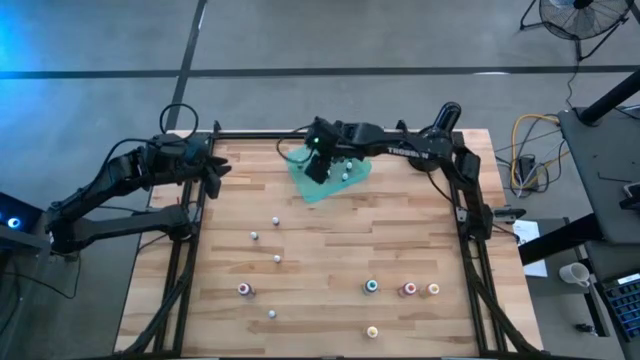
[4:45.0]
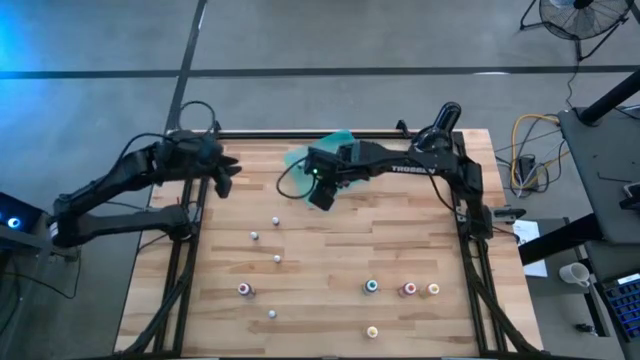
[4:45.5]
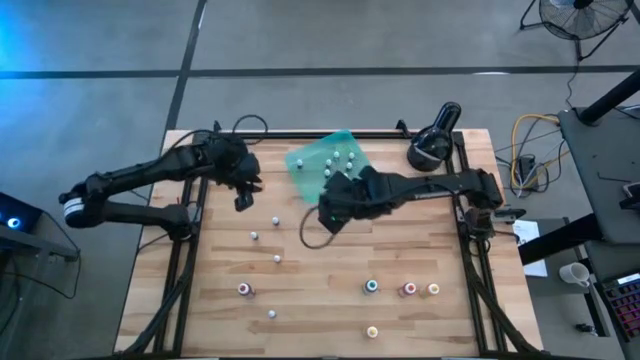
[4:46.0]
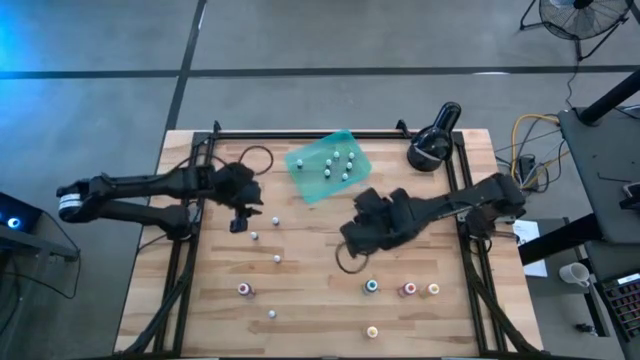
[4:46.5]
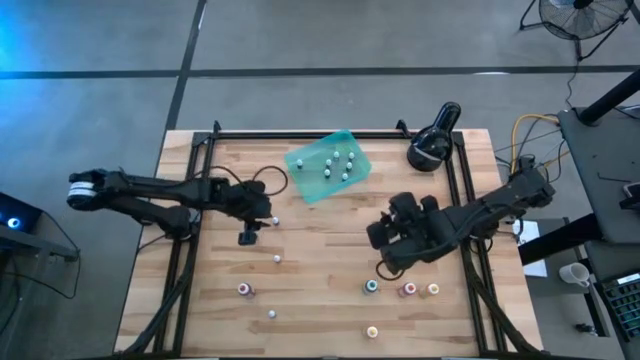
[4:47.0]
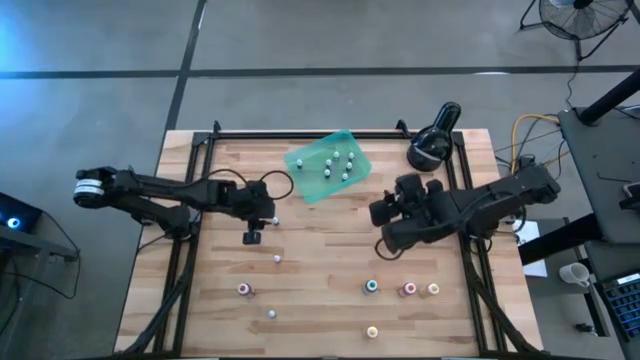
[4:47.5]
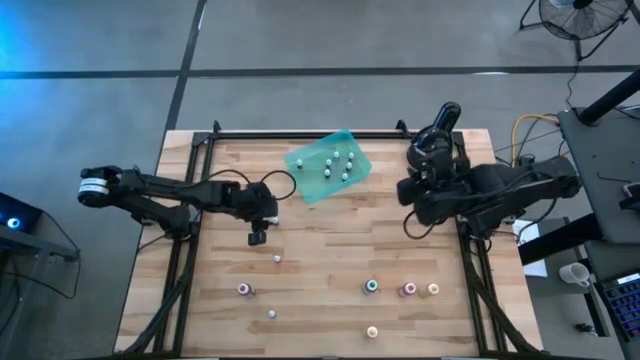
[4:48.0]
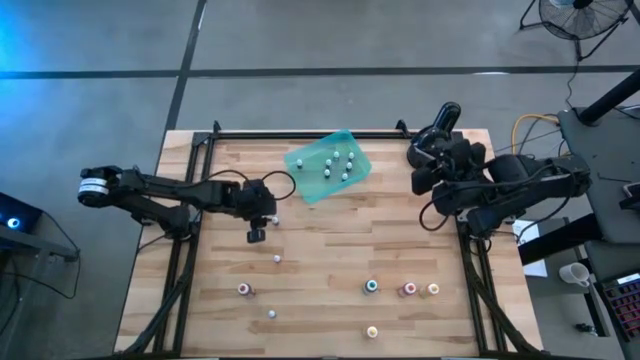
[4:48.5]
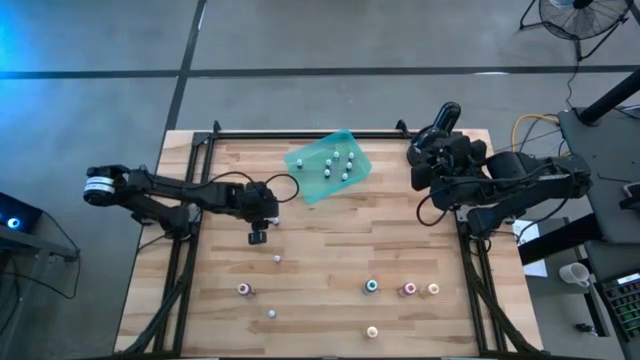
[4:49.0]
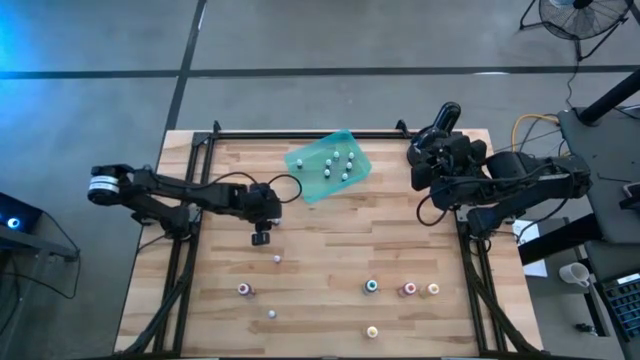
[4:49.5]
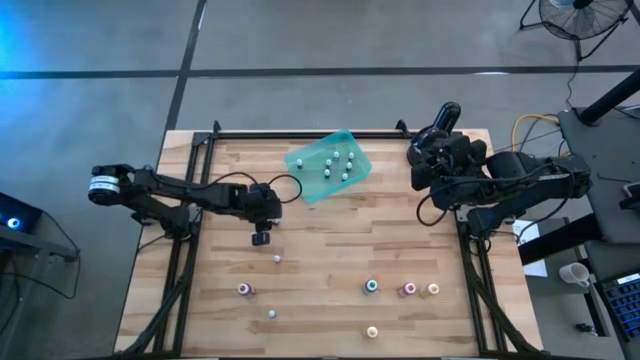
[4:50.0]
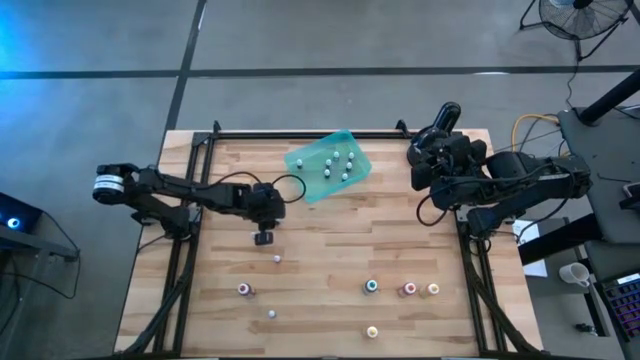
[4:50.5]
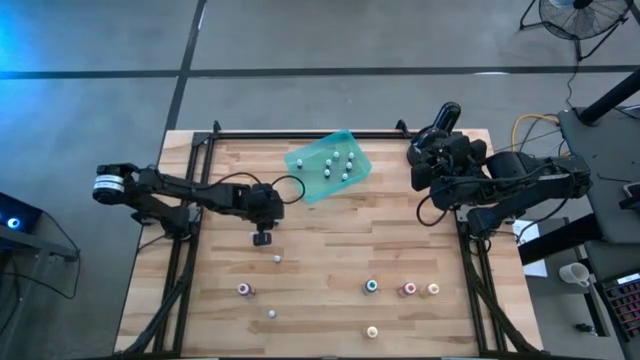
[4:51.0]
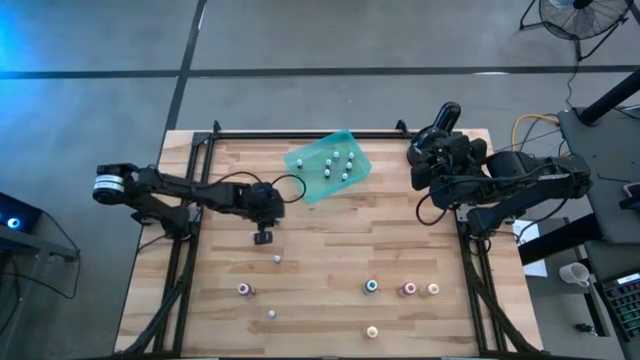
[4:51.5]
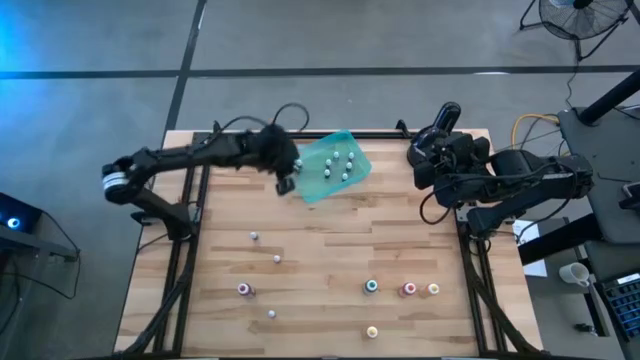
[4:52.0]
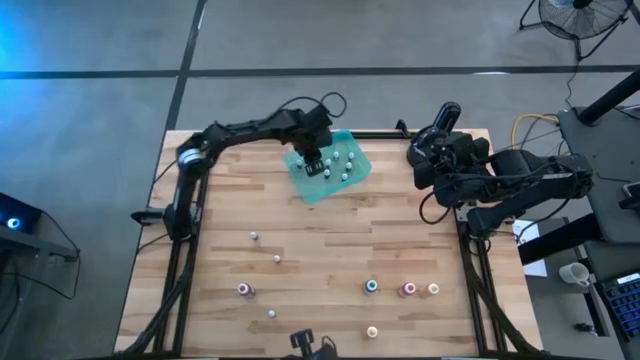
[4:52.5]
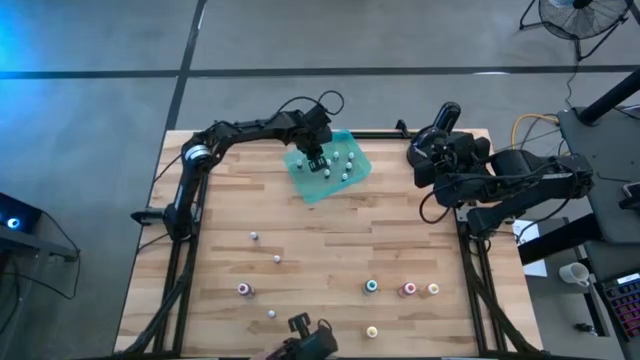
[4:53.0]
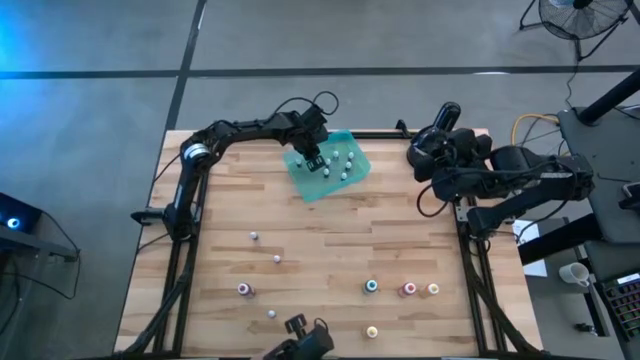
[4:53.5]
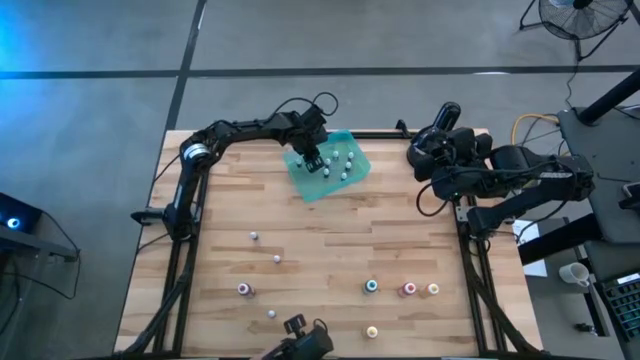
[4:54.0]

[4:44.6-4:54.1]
Task: Pick & Place food coloring
Put the red small food coloring into the green bin

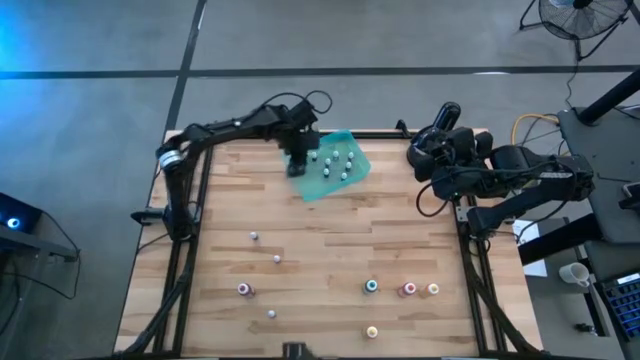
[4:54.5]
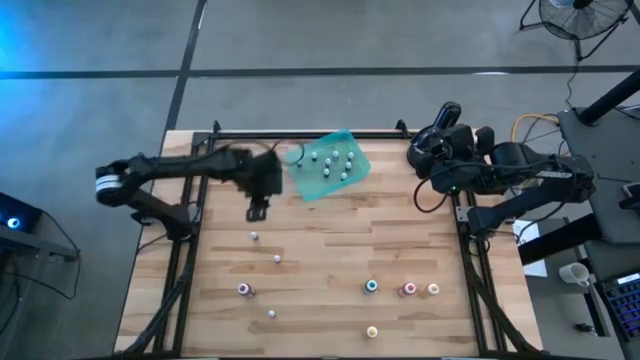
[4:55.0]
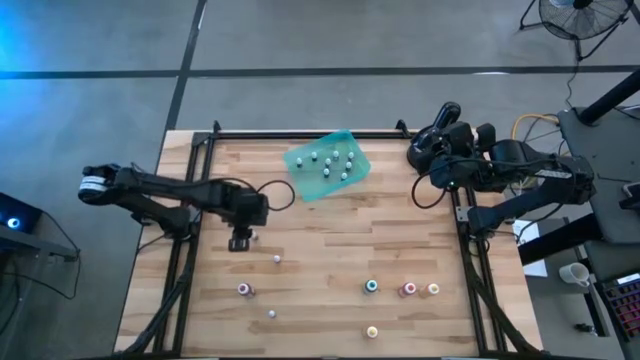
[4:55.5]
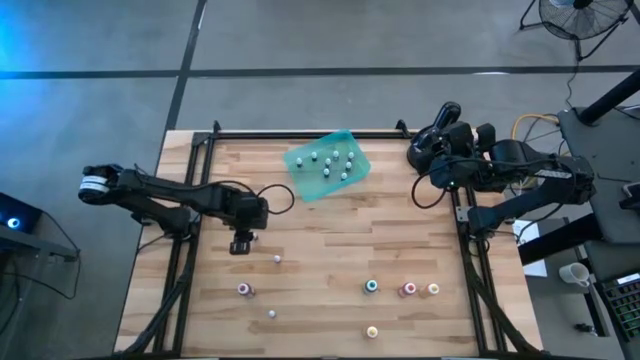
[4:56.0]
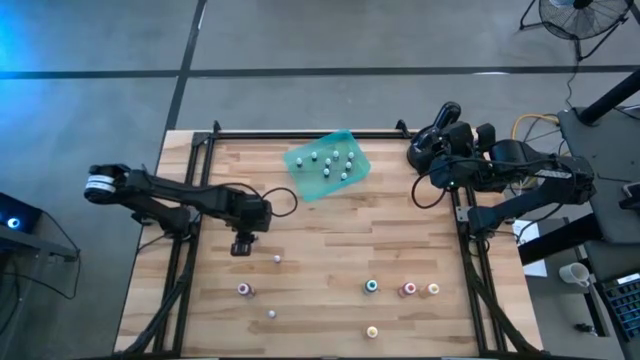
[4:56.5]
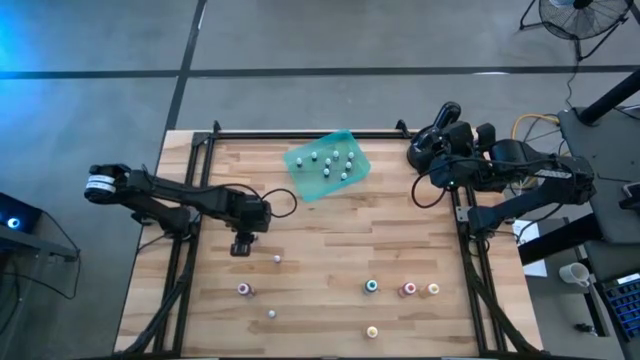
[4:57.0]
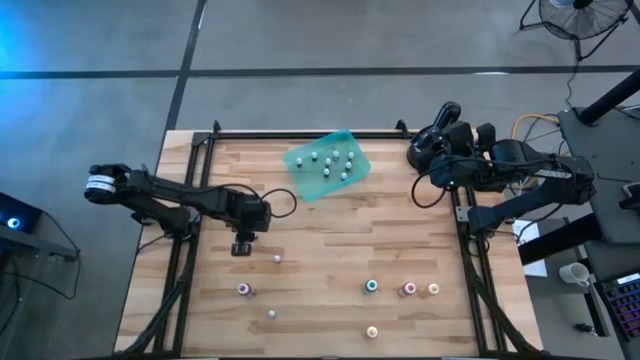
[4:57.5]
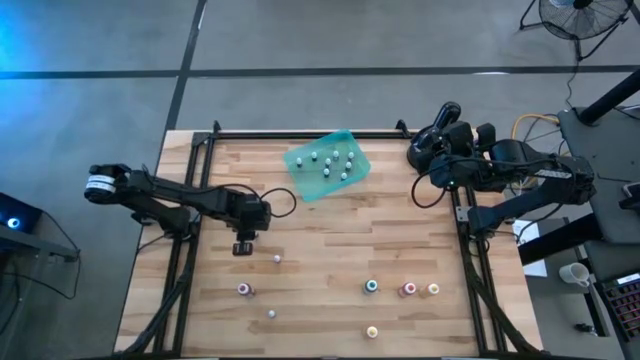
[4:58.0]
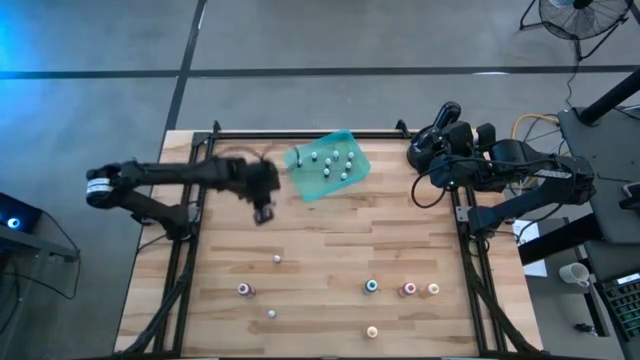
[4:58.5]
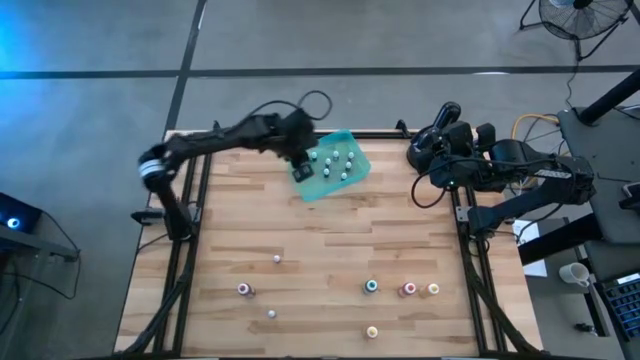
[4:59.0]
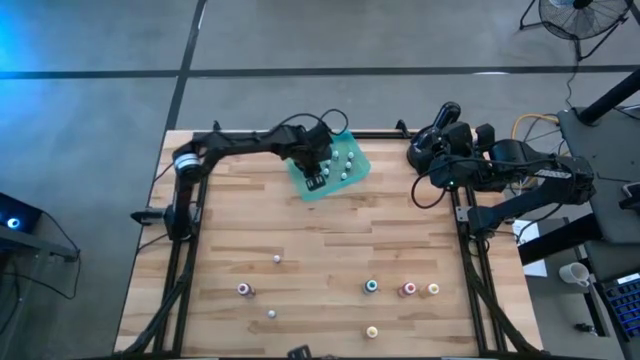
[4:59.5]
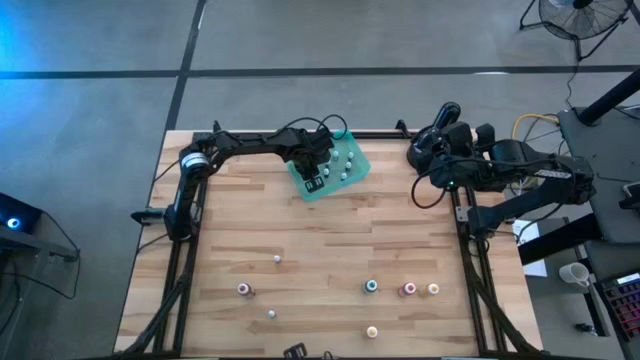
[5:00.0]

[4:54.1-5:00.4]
Put the blue small food coloring into the green bin

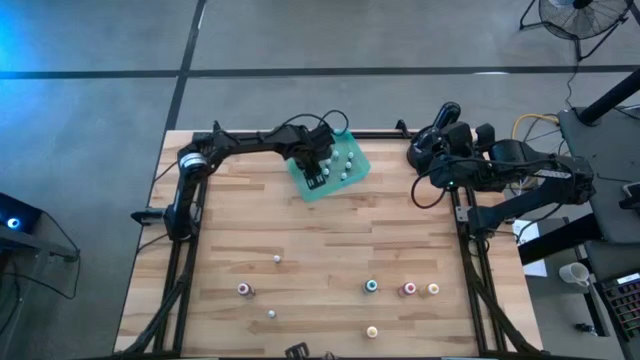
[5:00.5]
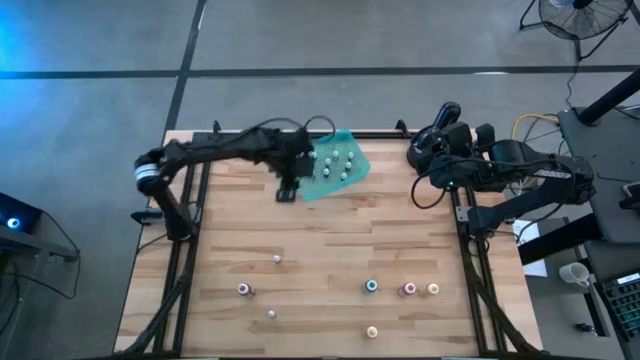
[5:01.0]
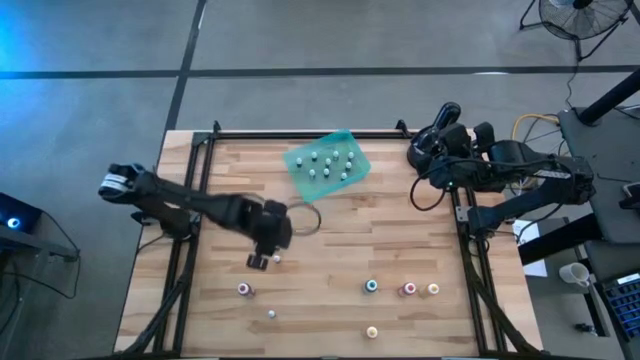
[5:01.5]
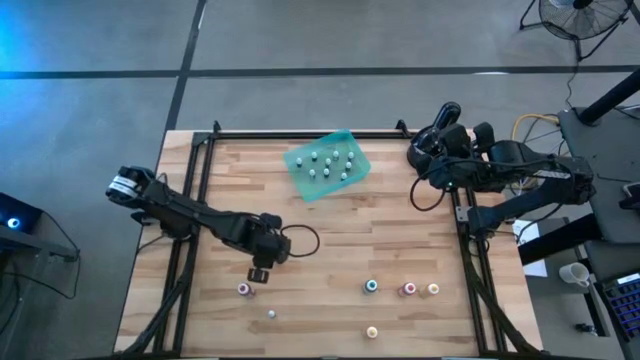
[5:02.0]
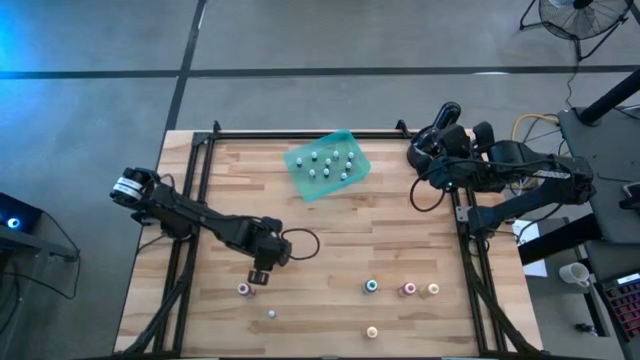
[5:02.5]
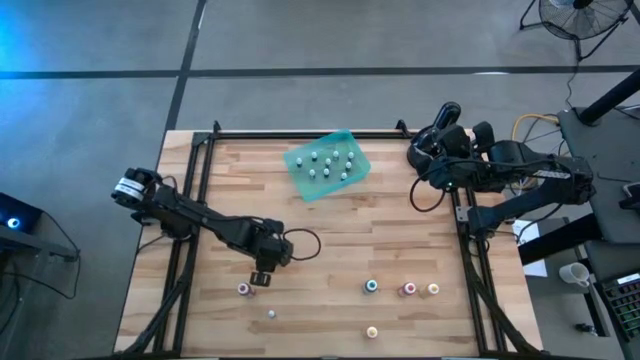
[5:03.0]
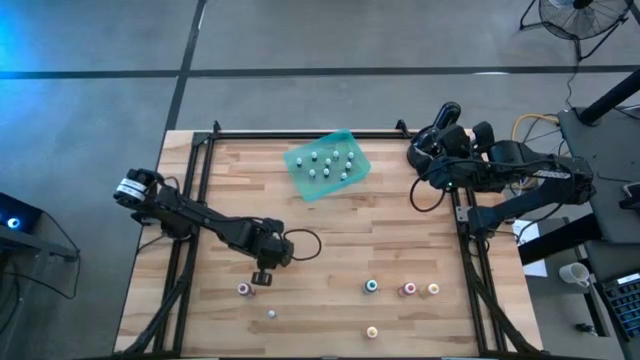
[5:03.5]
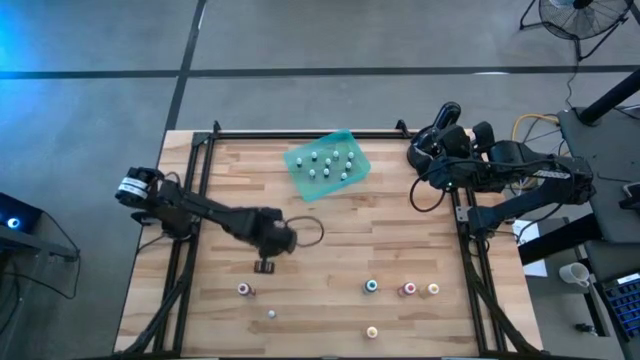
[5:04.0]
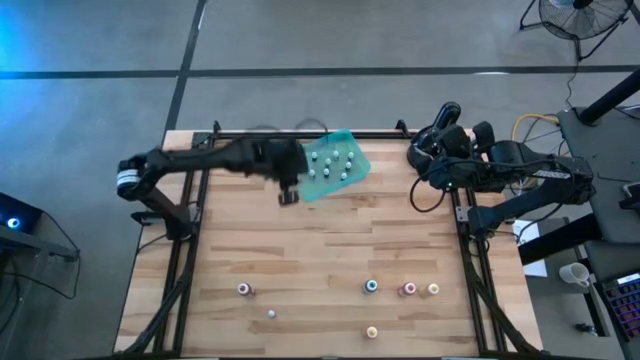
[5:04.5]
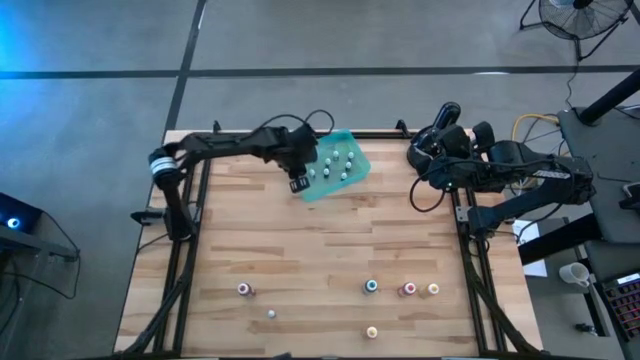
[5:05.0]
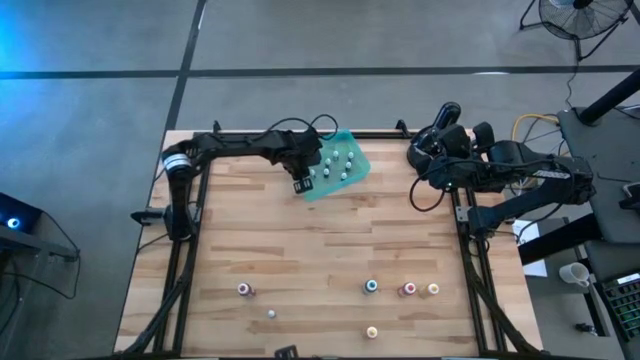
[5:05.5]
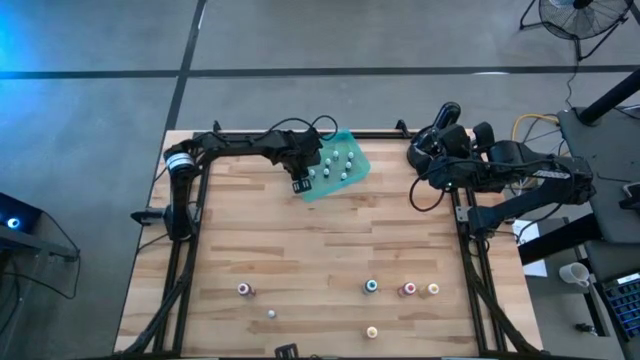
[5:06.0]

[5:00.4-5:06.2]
Put the blue small food coloring into the green bin
